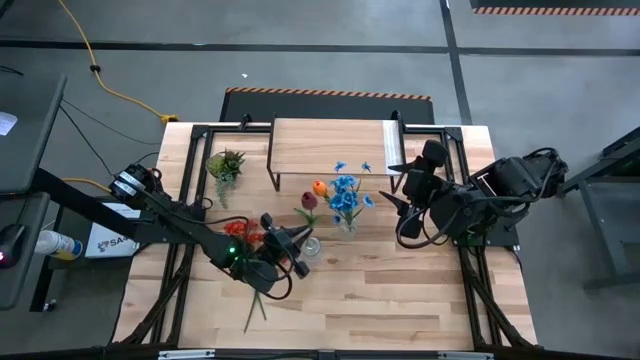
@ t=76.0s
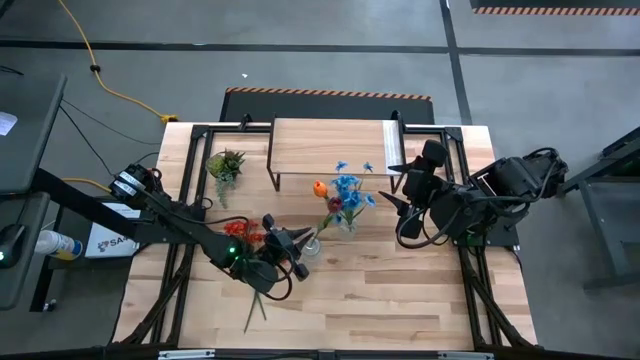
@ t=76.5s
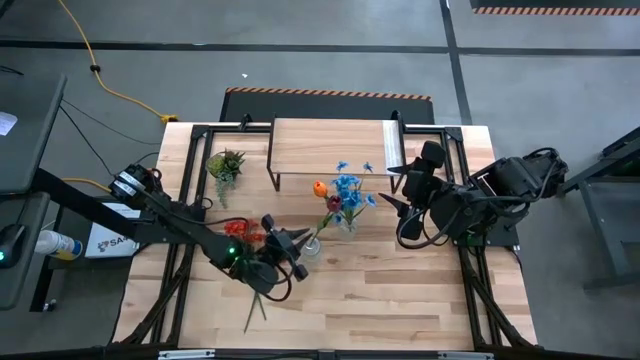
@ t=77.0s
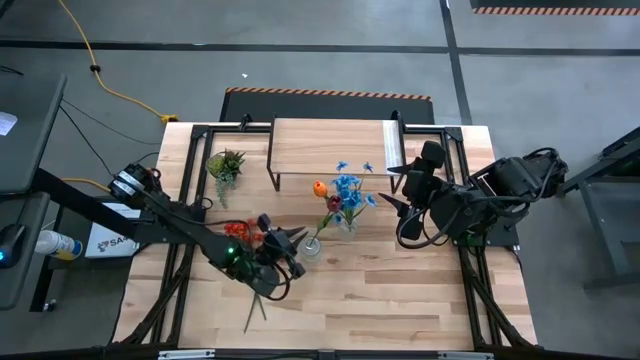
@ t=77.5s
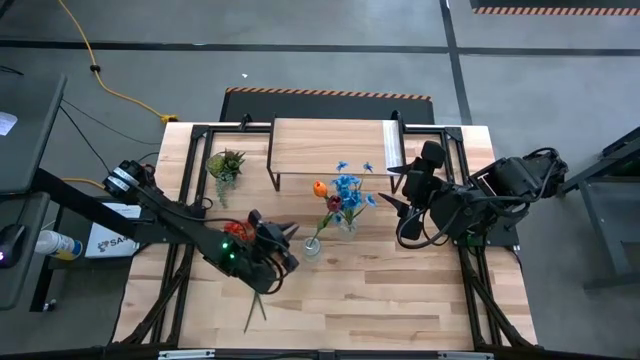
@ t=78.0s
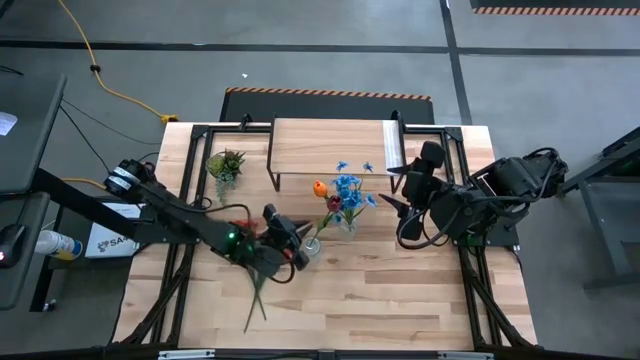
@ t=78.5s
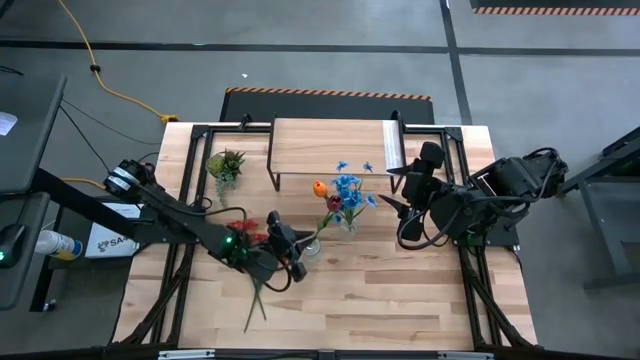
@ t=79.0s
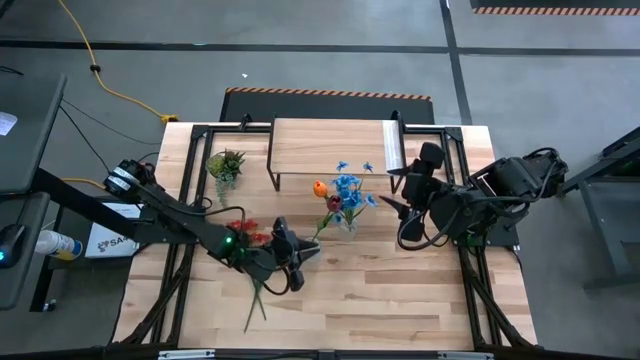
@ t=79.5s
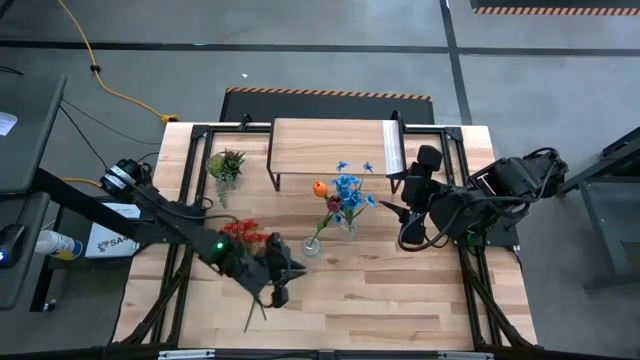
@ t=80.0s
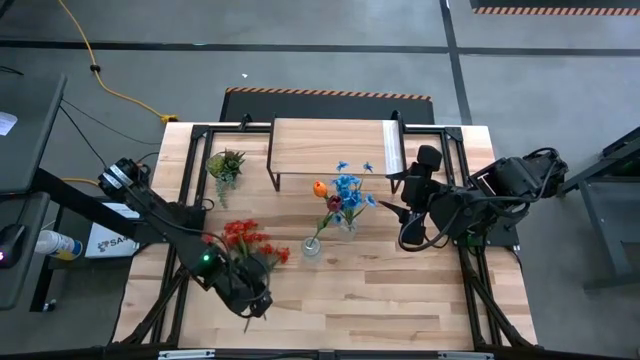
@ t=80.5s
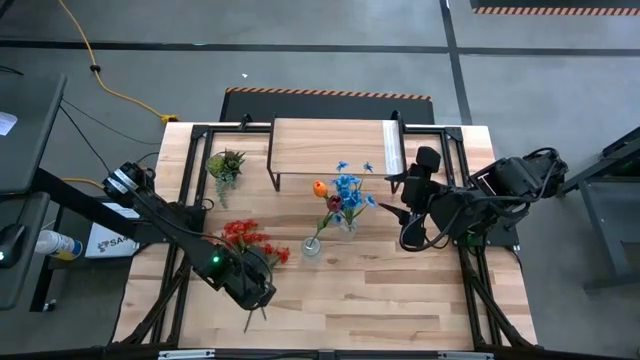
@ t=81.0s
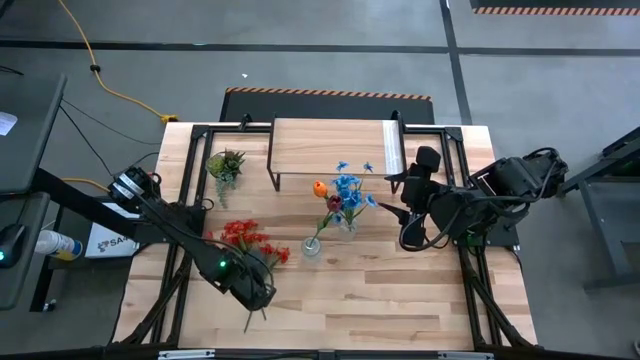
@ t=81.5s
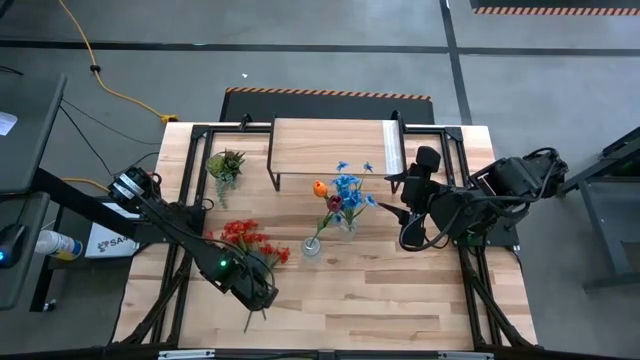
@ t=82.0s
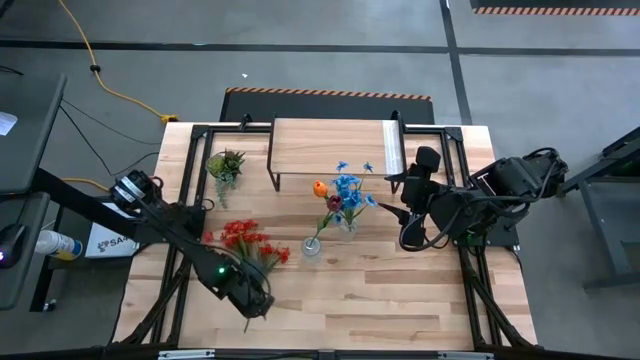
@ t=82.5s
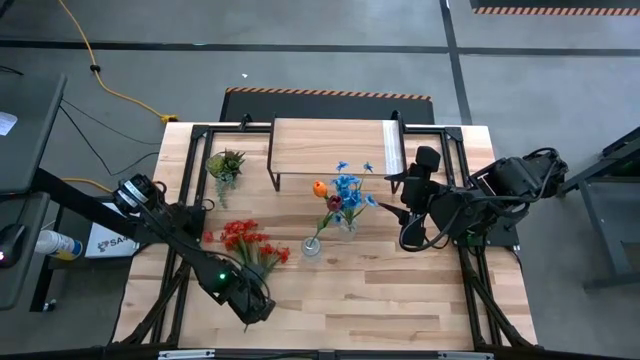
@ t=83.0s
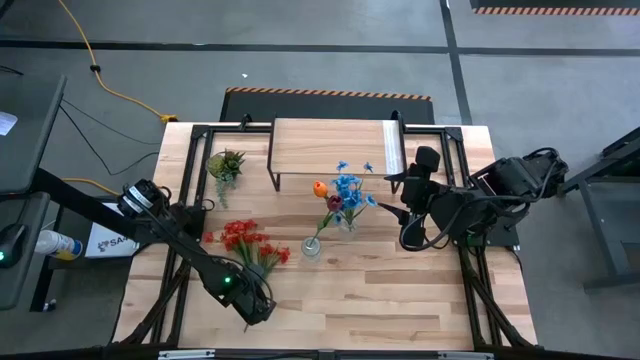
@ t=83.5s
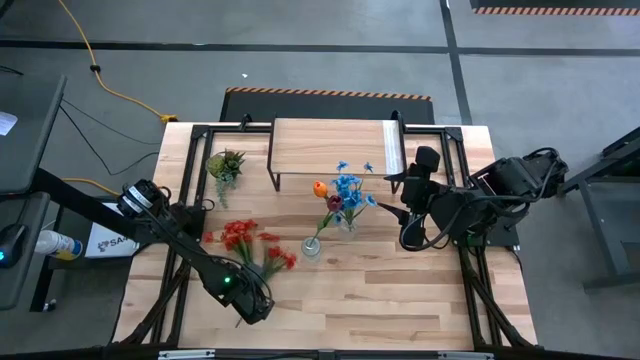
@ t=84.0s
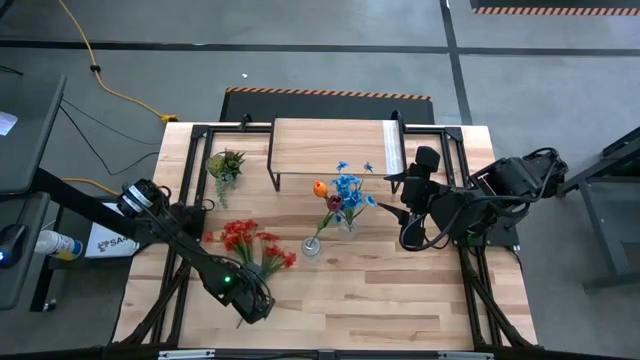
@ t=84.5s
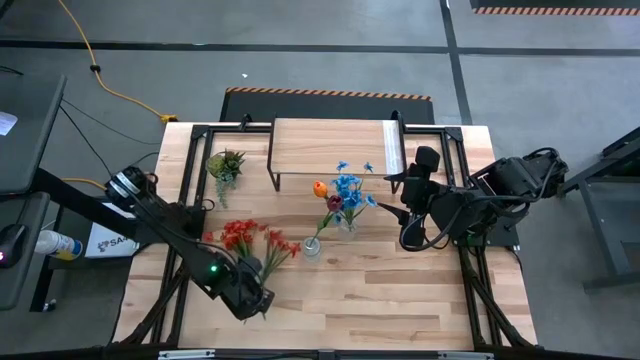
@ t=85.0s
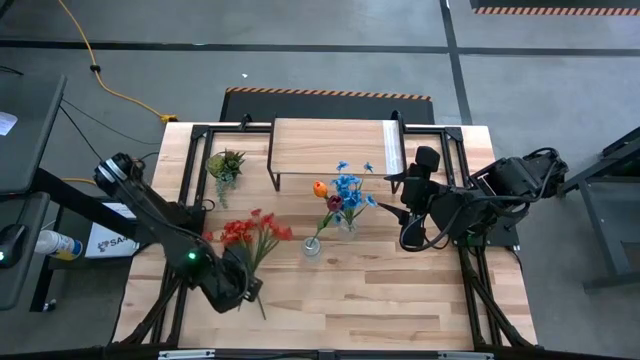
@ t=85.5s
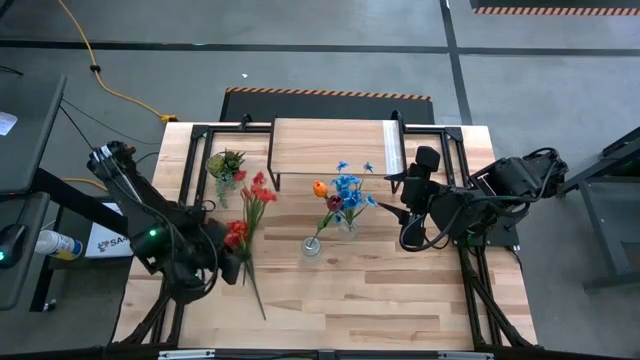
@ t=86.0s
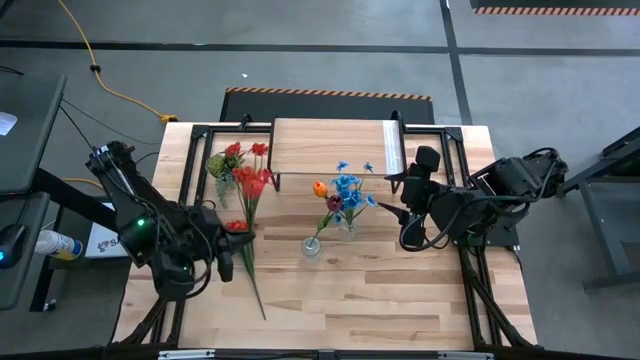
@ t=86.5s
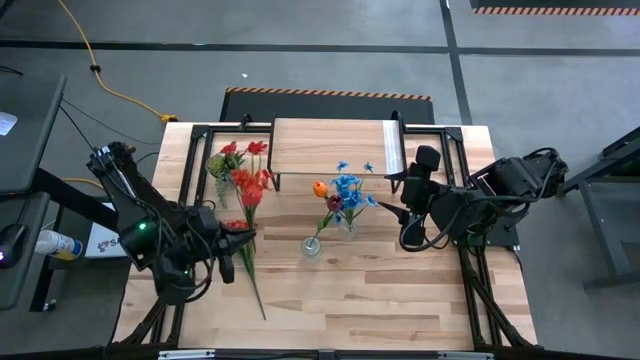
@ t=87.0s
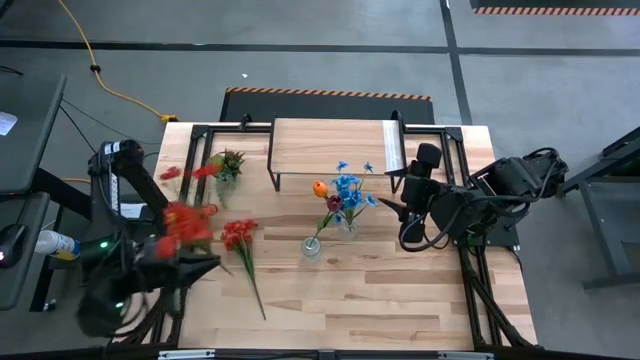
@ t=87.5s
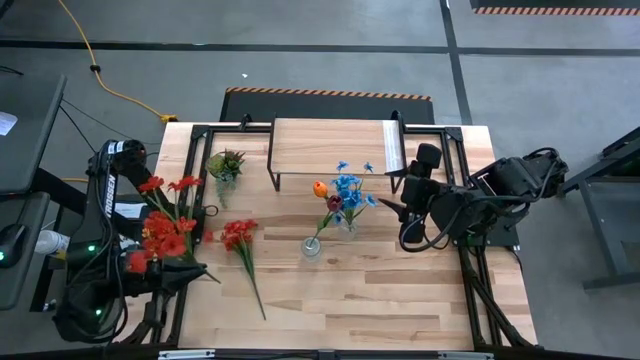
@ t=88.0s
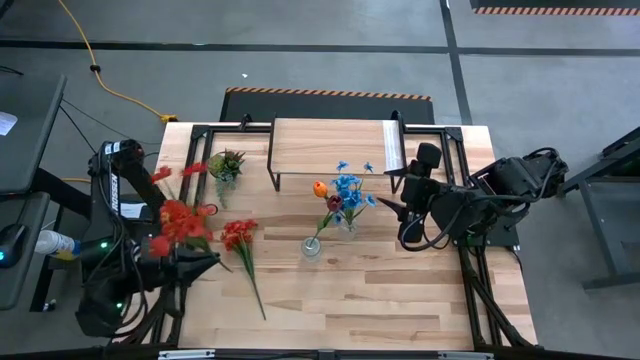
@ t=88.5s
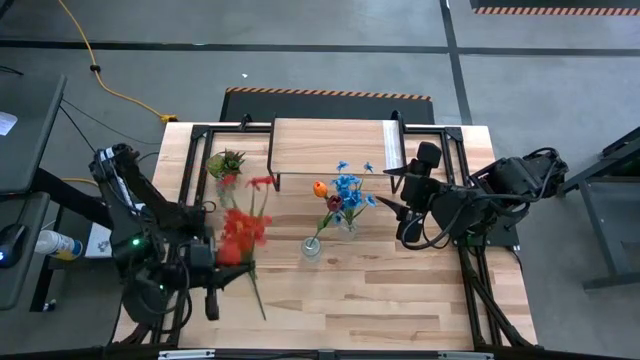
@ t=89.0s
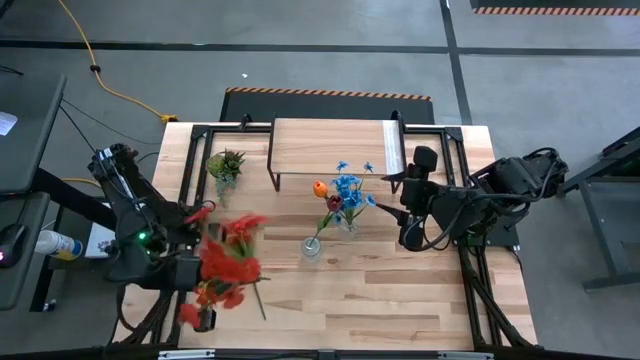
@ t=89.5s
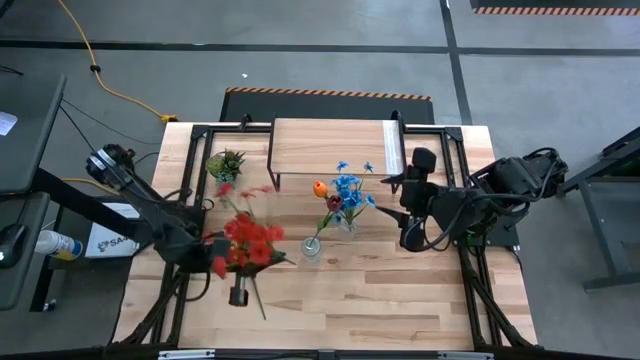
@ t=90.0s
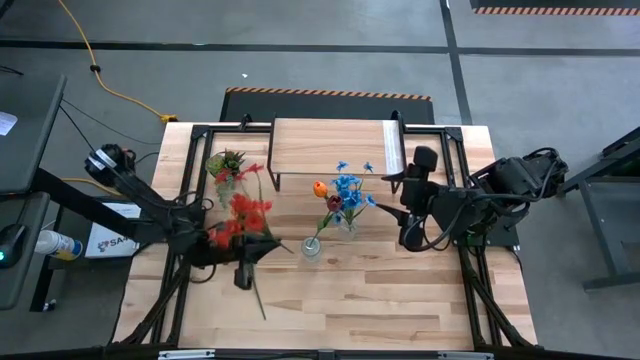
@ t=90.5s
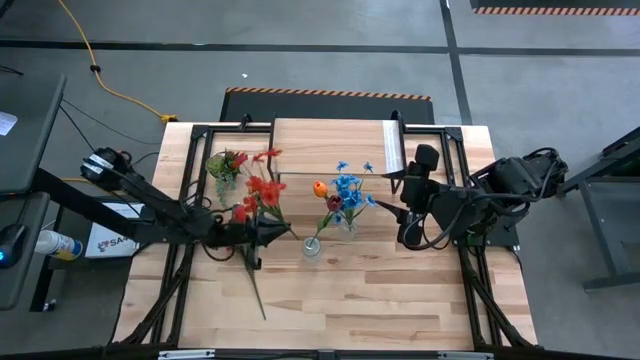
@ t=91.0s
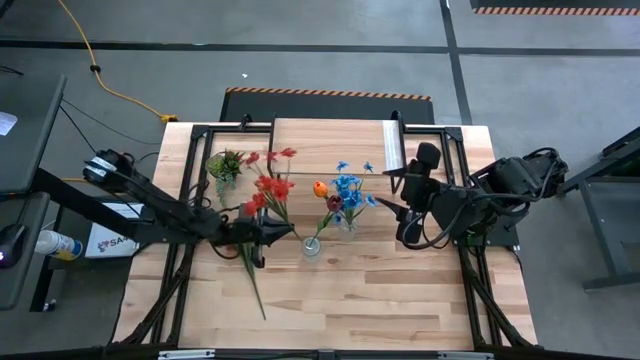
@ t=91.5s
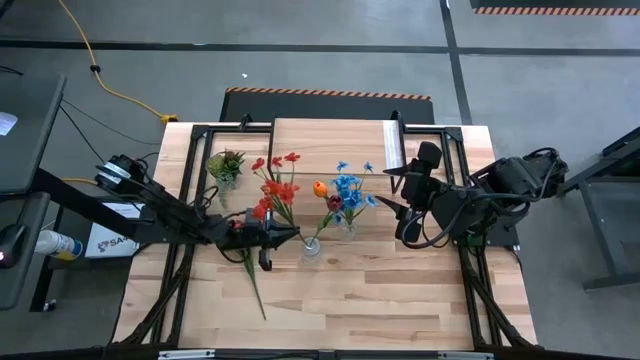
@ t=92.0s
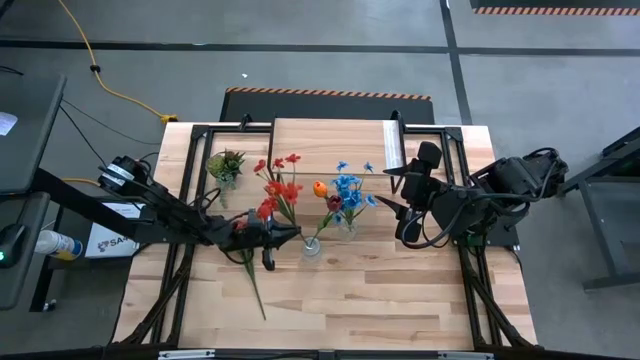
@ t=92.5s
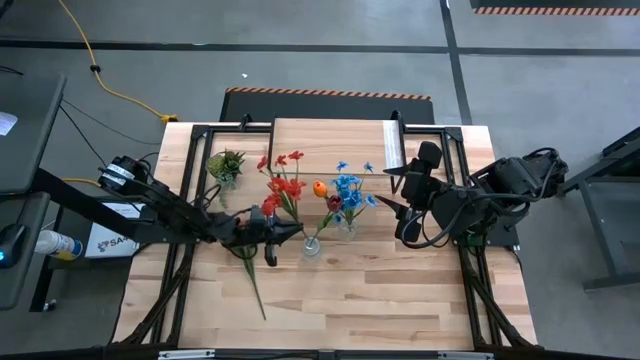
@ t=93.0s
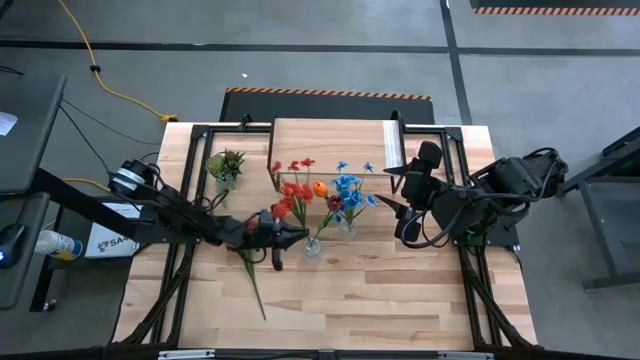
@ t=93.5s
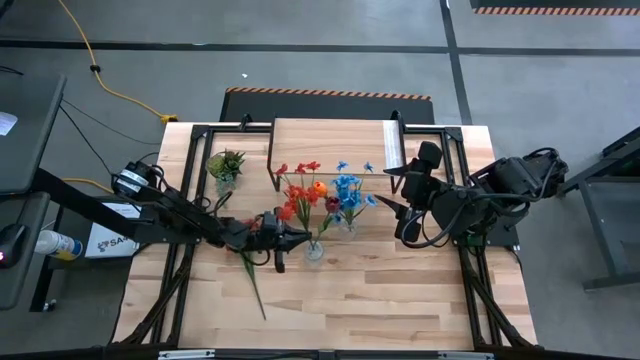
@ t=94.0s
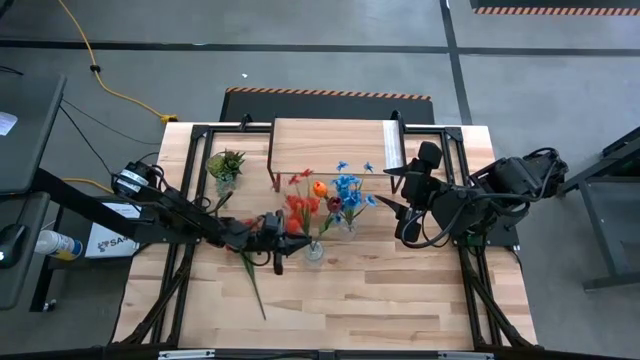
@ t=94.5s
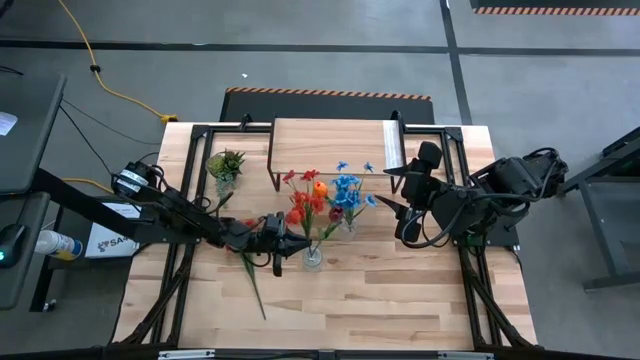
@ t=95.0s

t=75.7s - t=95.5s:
Task: Pick and place flowers into a vace then onto a shelf
Put the right orange flowers into the bottom transparent vase
